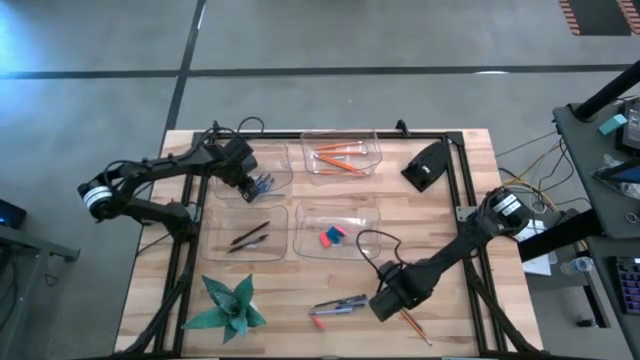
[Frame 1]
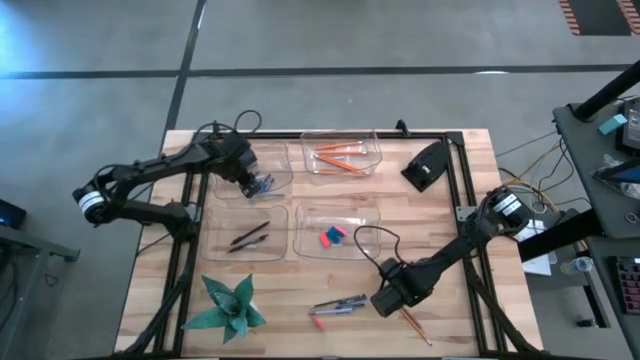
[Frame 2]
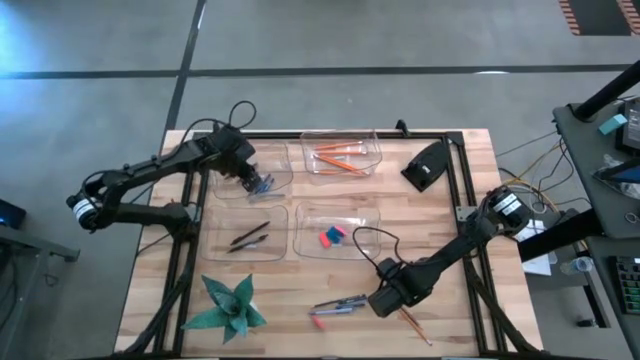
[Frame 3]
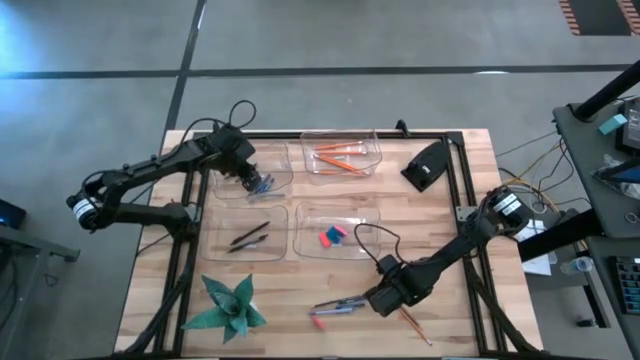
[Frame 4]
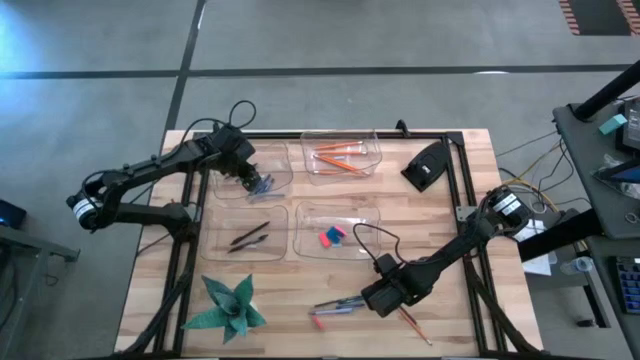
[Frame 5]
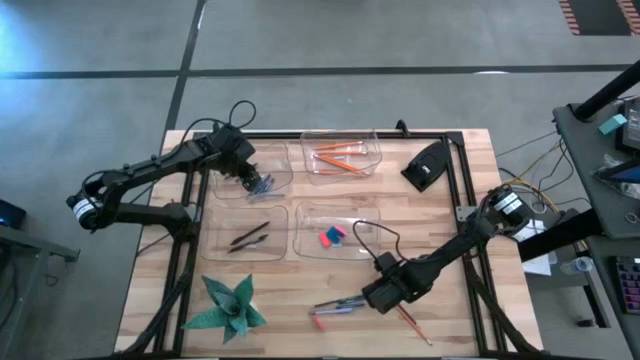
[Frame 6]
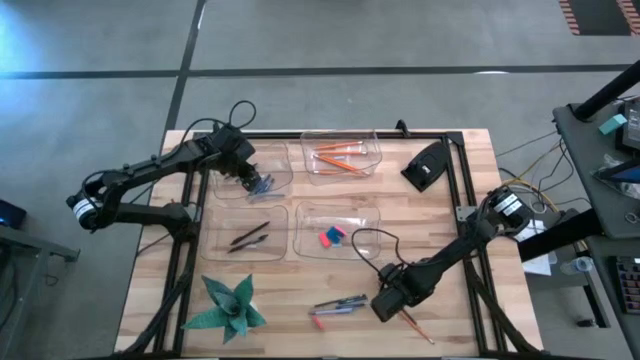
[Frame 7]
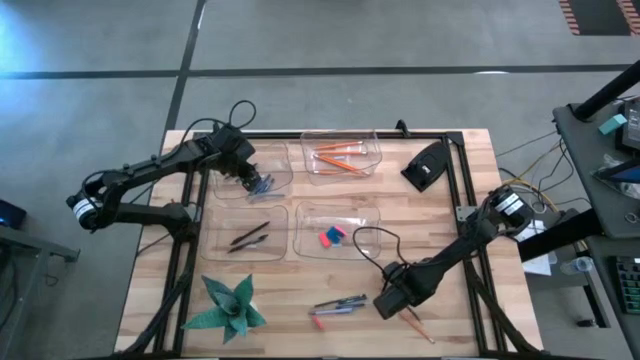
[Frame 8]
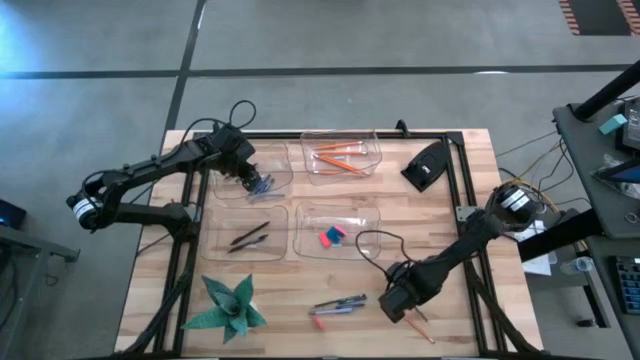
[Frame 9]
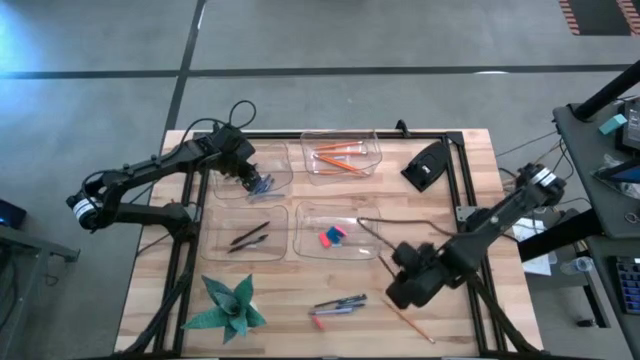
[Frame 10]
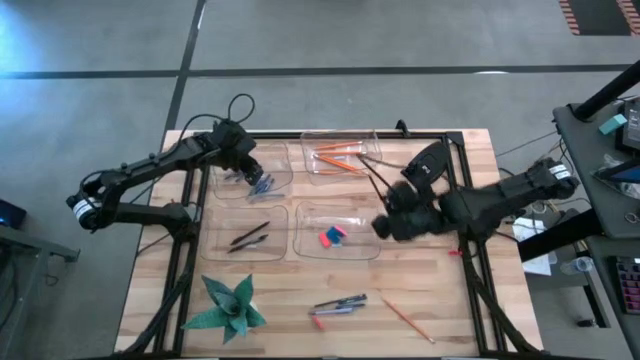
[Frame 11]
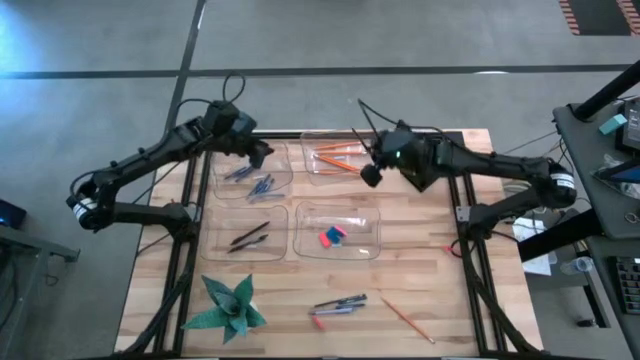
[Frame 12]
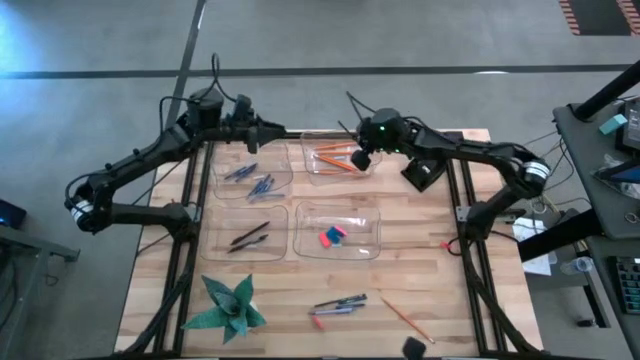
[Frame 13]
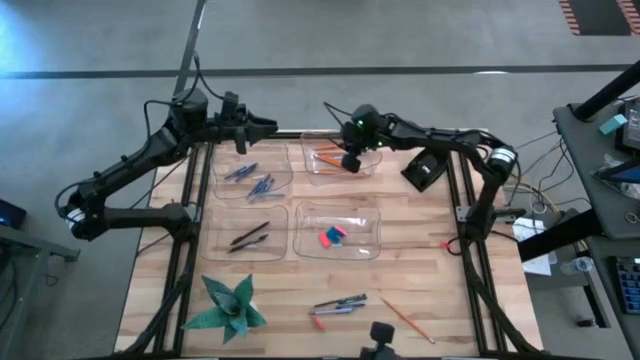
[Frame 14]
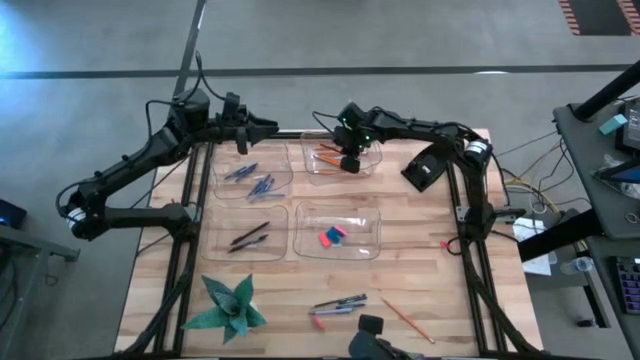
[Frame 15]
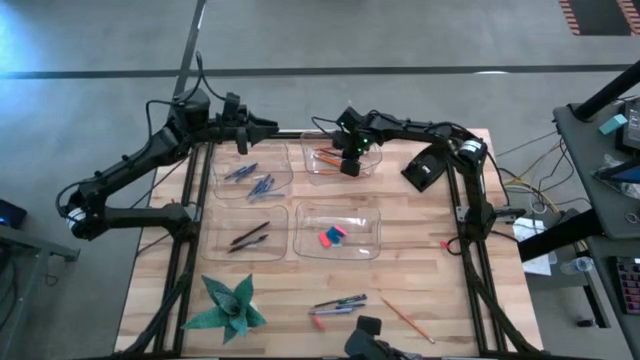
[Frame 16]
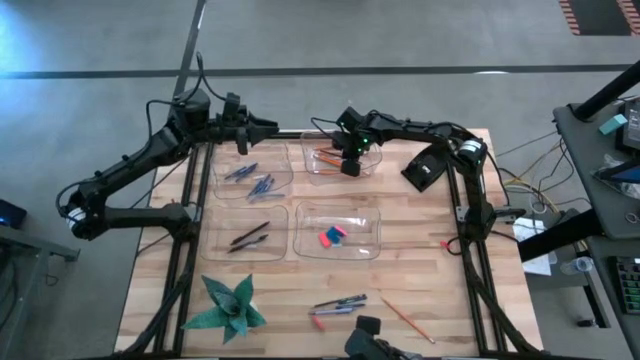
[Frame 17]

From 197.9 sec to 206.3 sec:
Task: Sort crayons/erasers/pens/pencils in bins
Put the black pencil into the top right transparent bin

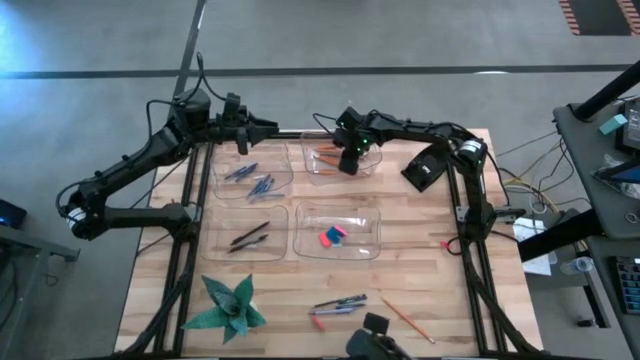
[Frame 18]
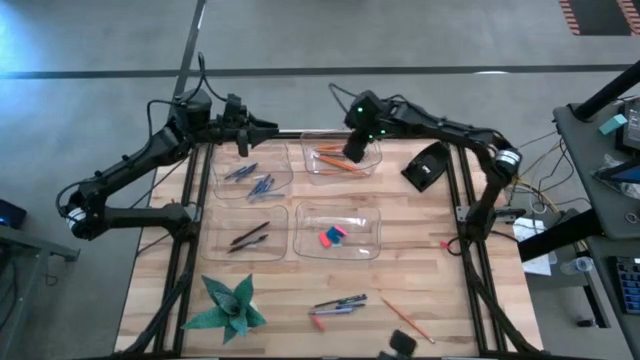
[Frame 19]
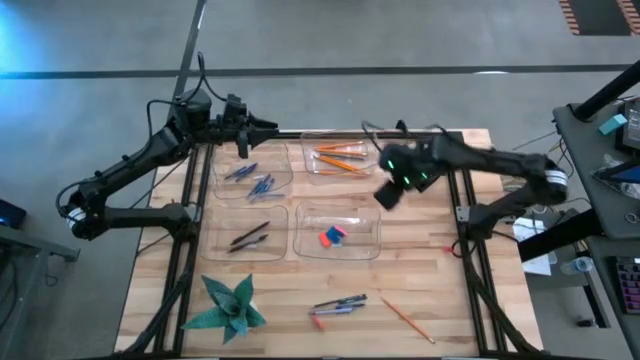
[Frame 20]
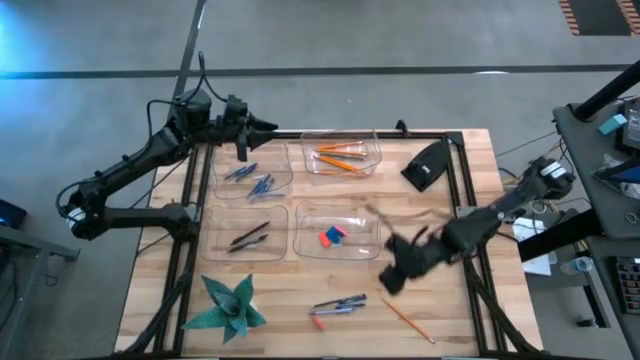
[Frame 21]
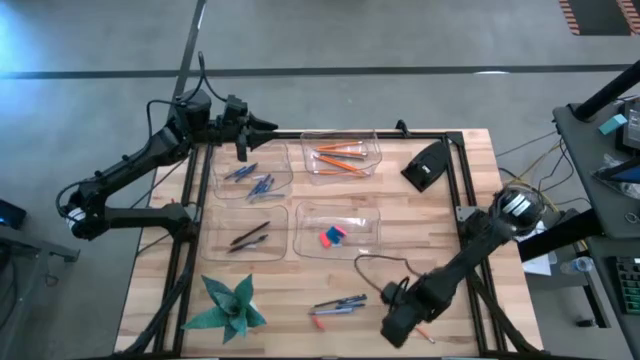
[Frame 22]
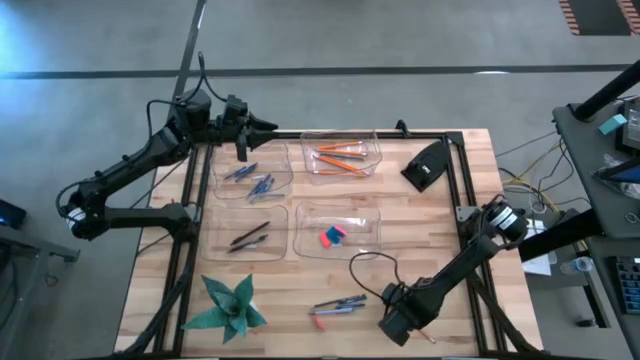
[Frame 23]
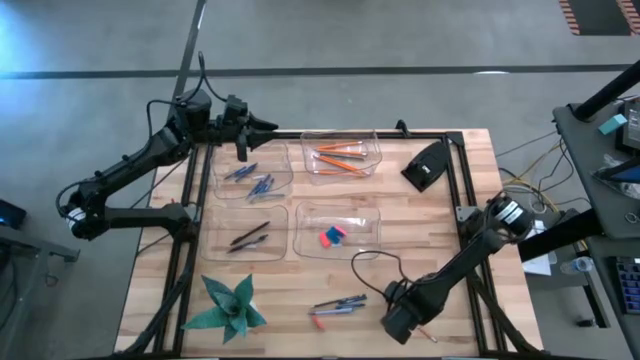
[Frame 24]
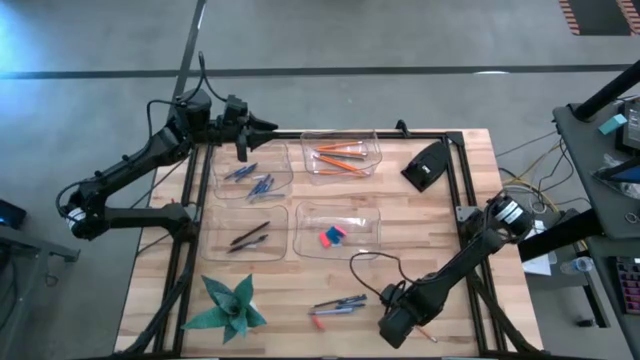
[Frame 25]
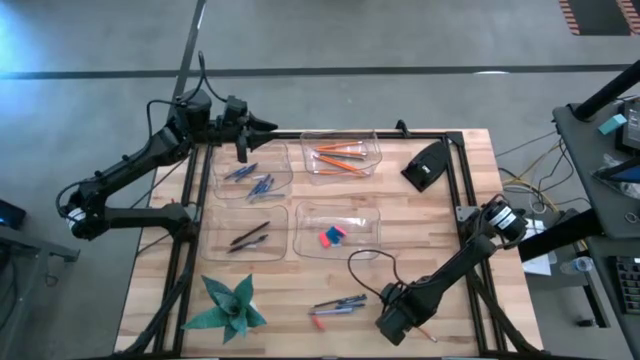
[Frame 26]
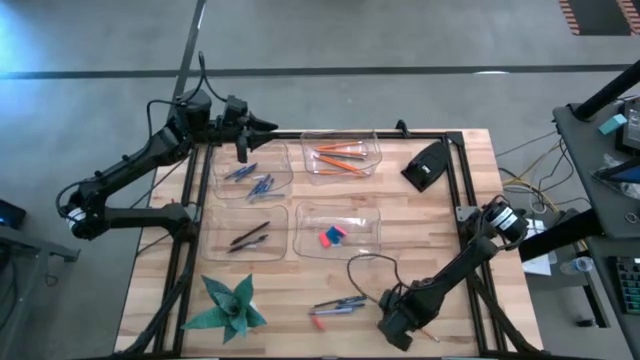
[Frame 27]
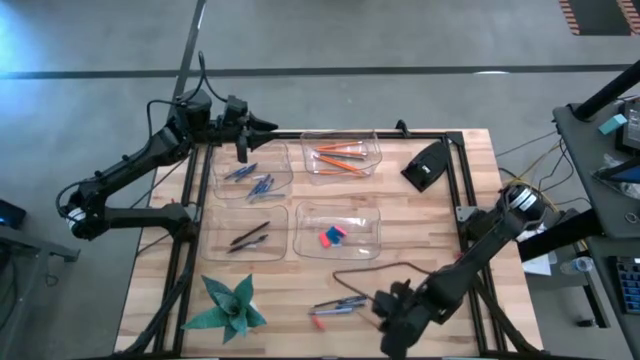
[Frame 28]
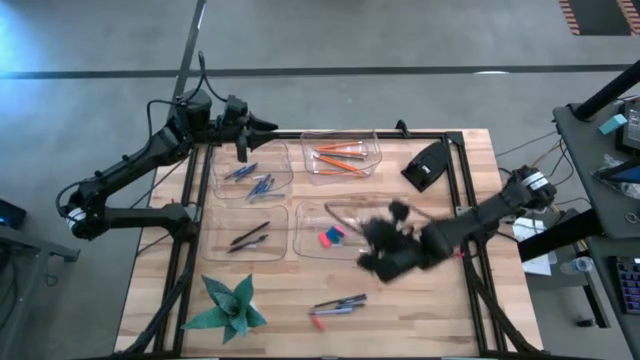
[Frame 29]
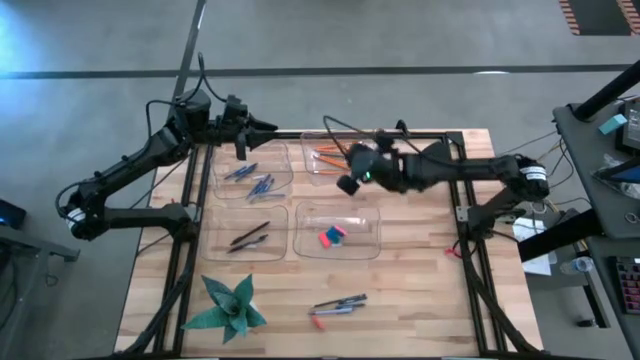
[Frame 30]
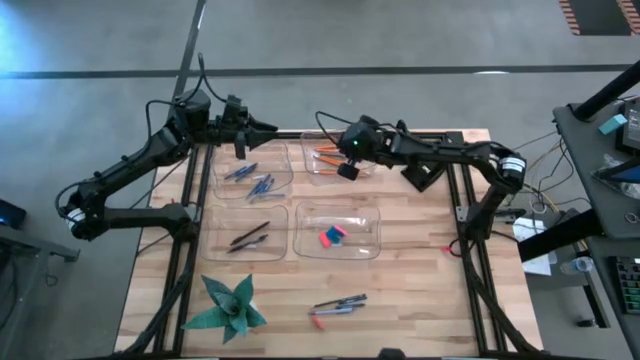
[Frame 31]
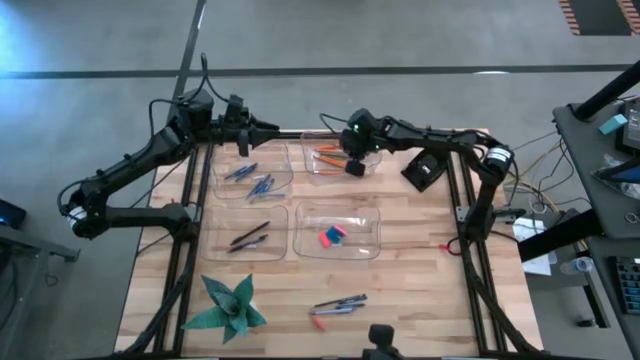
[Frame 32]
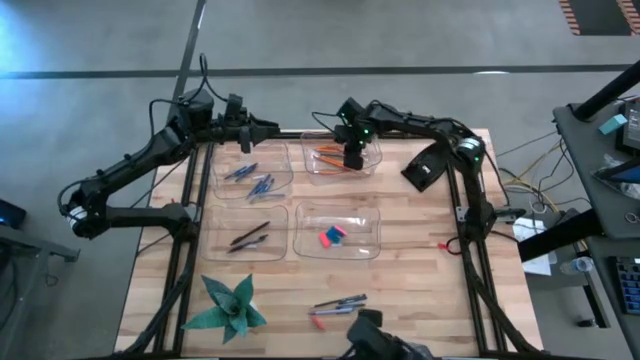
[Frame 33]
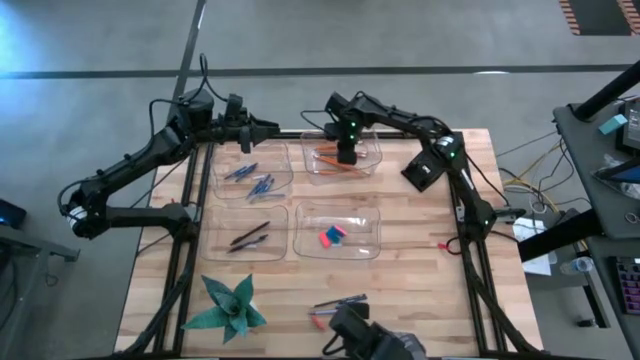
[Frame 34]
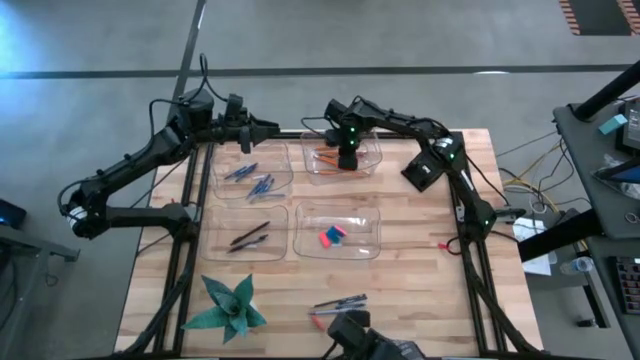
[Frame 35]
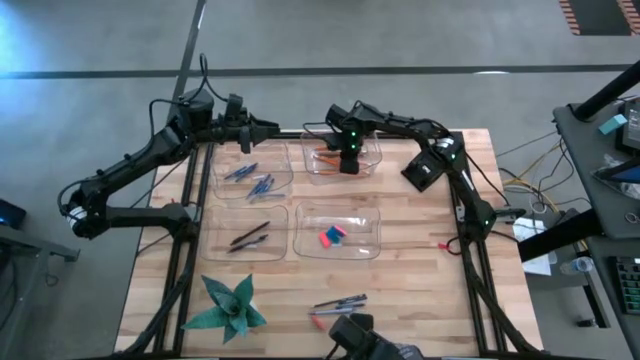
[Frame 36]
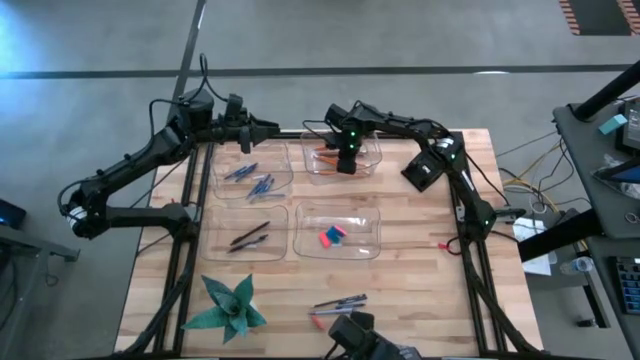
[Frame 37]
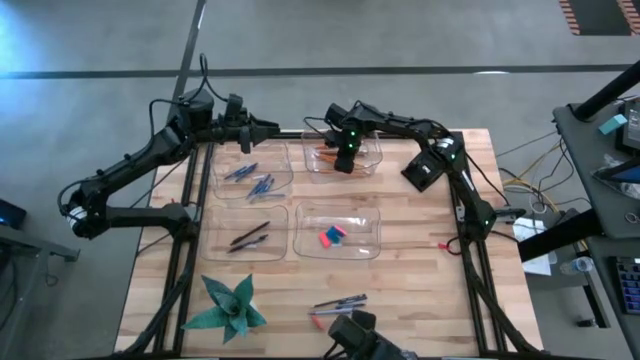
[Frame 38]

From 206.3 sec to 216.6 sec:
Put the orange pencil into the top right transparent bin

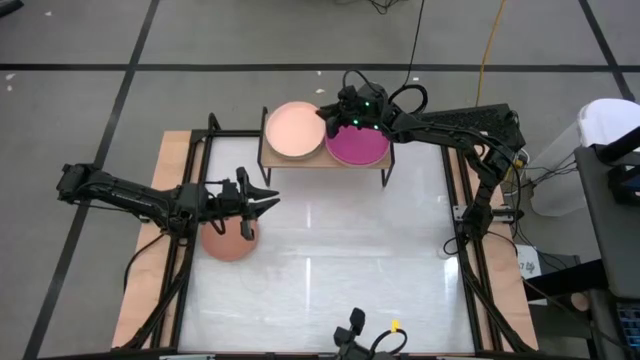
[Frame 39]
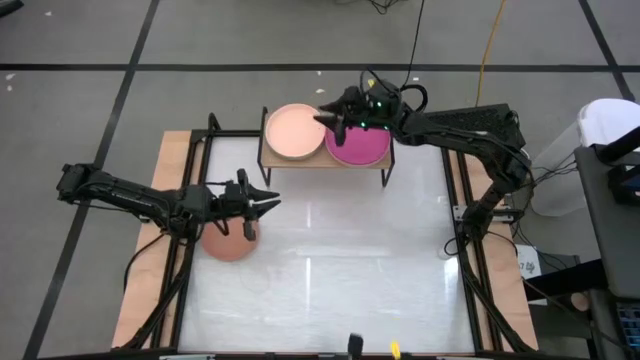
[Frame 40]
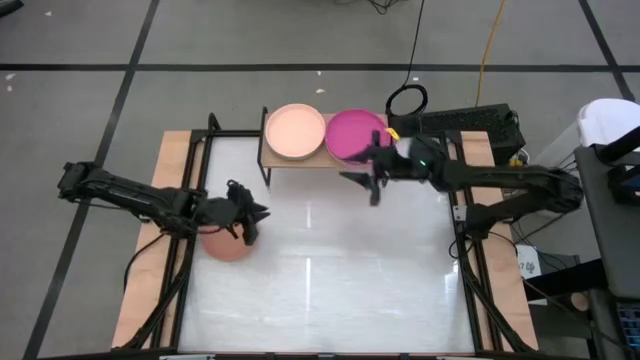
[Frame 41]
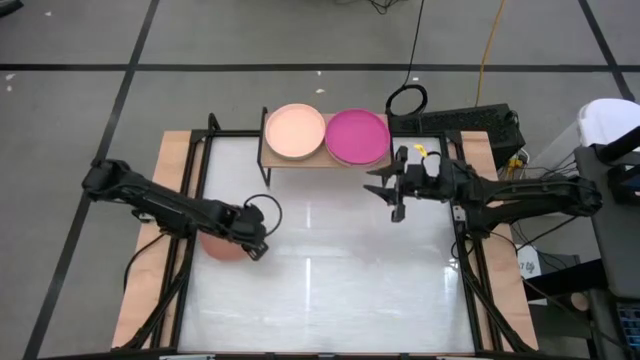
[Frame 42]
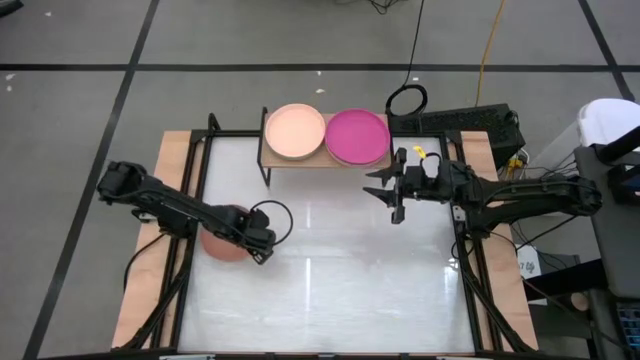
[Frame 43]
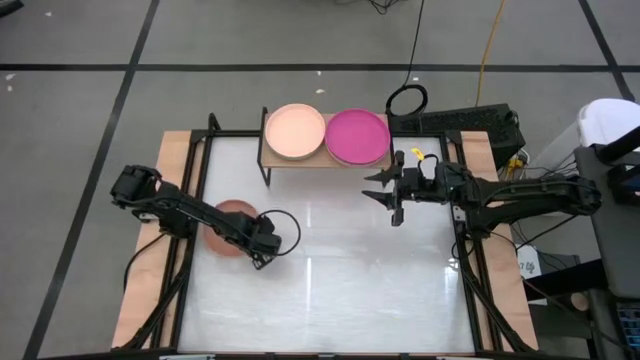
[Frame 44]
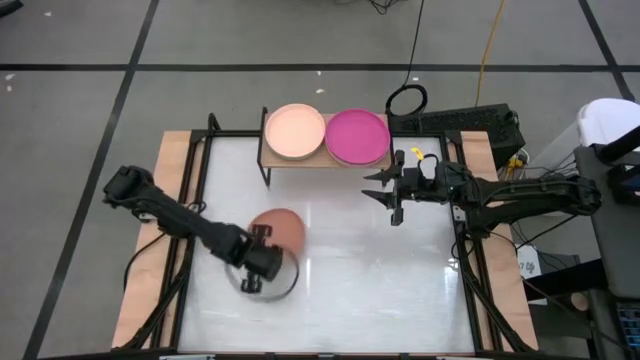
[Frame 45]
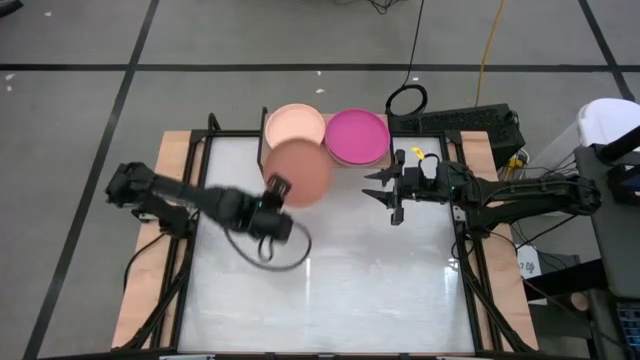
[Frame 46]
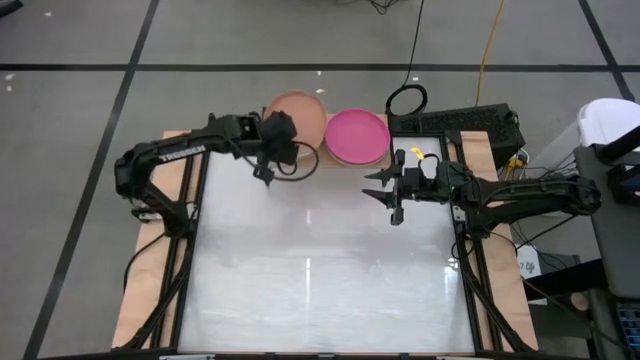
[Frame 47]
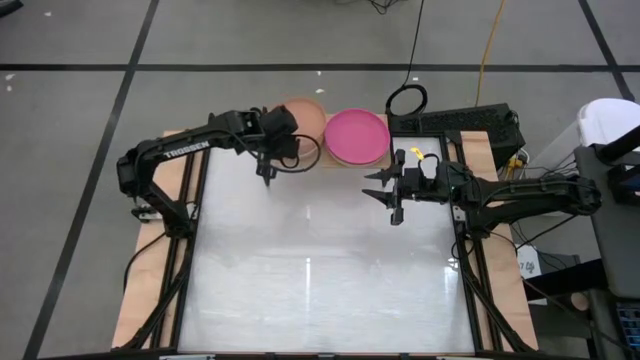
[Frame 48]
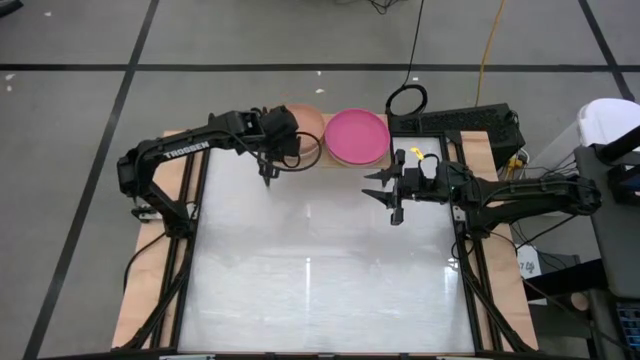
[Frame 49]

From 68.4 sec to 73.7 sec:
Task: Place and stack plates onto a shelf
Stack brown plate on top of the light orange plate on the shelf
